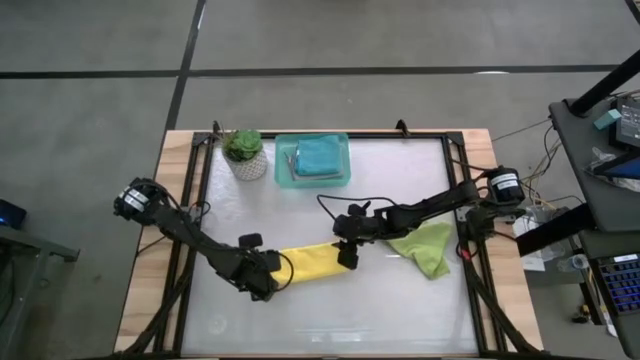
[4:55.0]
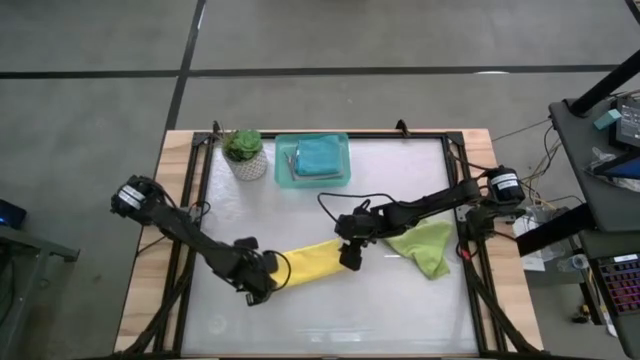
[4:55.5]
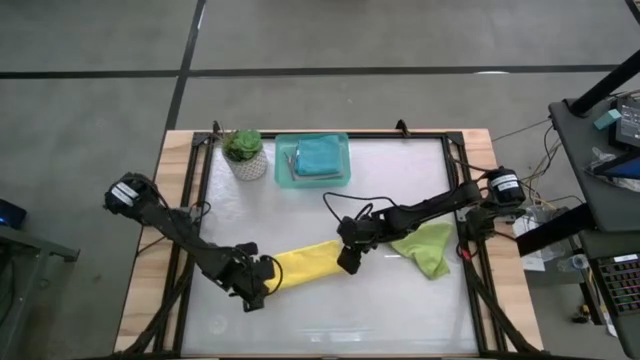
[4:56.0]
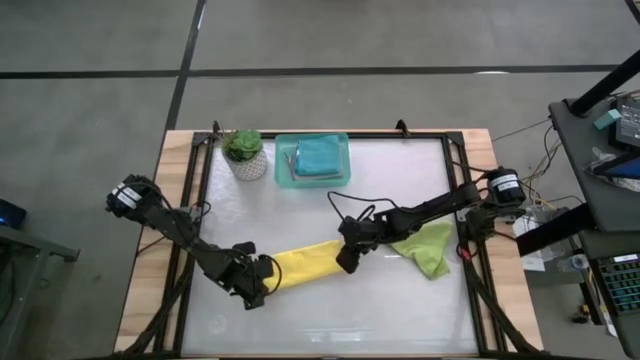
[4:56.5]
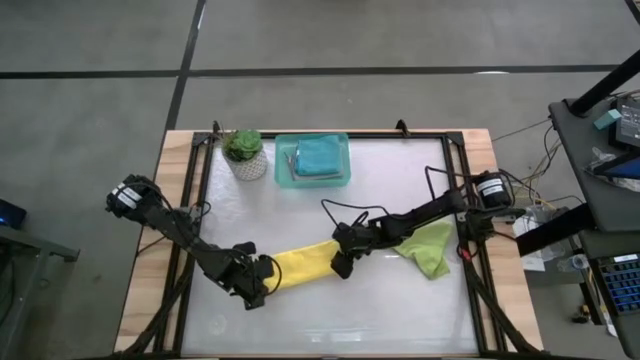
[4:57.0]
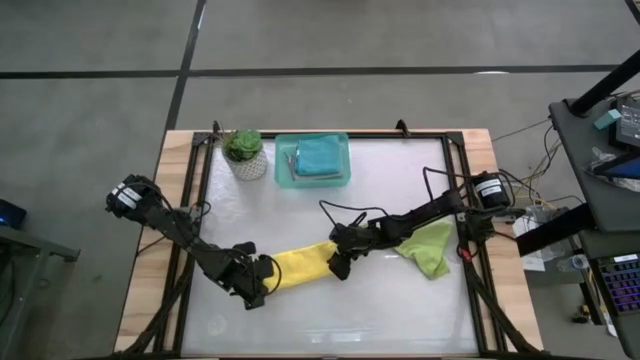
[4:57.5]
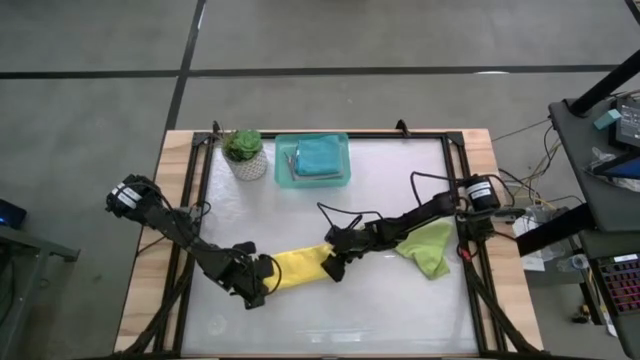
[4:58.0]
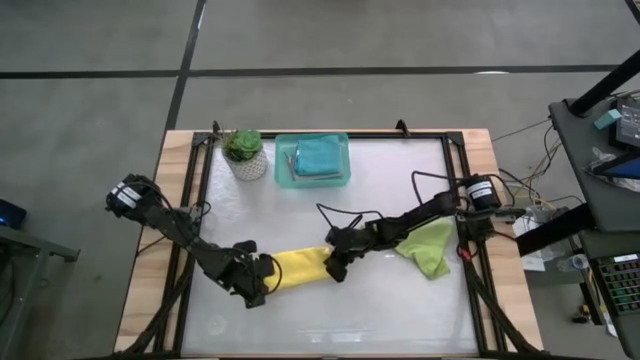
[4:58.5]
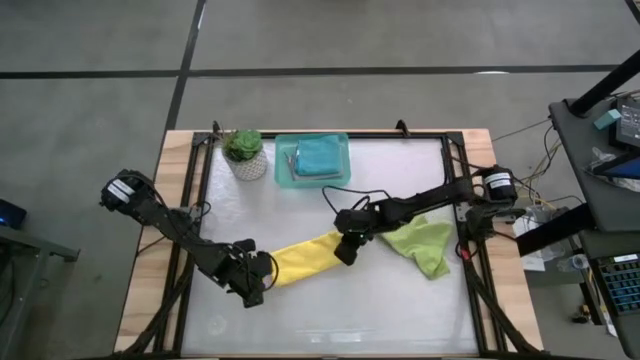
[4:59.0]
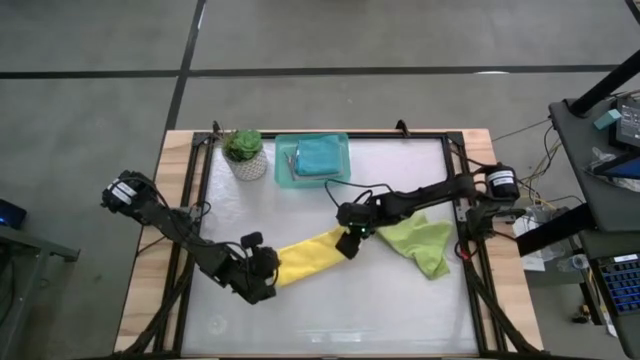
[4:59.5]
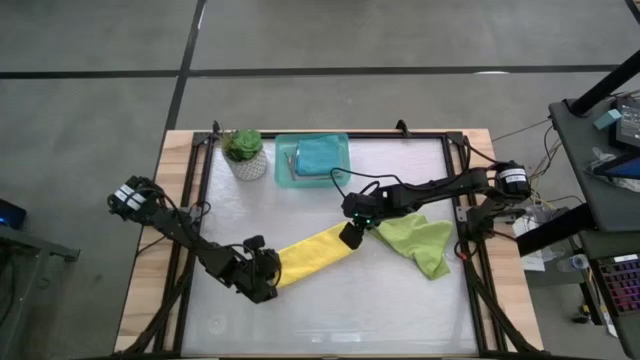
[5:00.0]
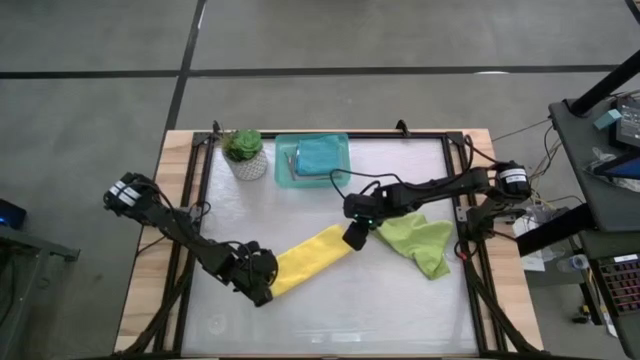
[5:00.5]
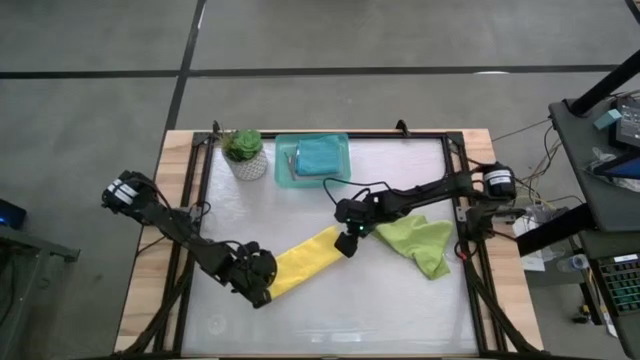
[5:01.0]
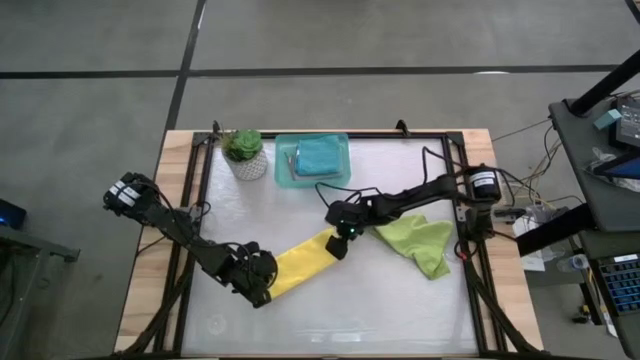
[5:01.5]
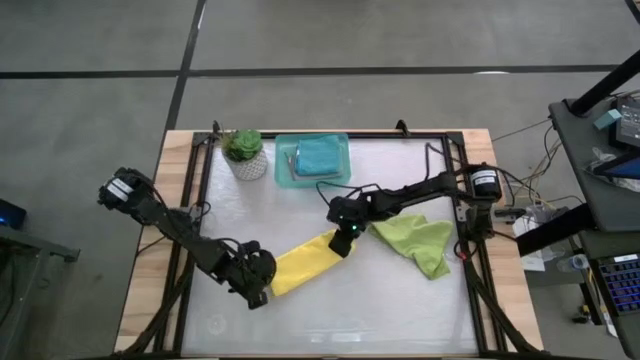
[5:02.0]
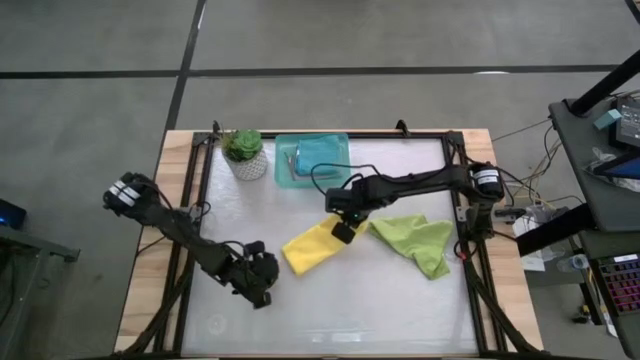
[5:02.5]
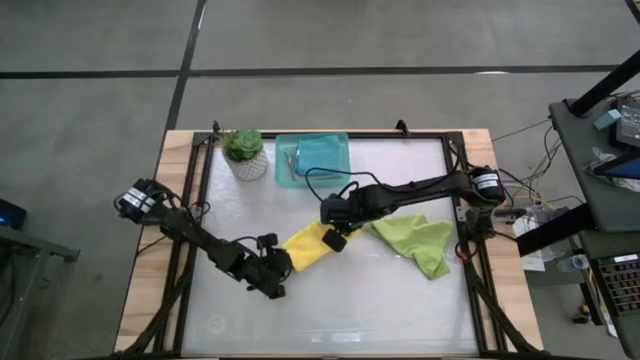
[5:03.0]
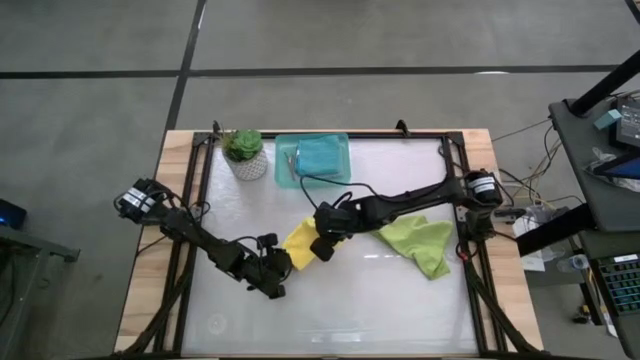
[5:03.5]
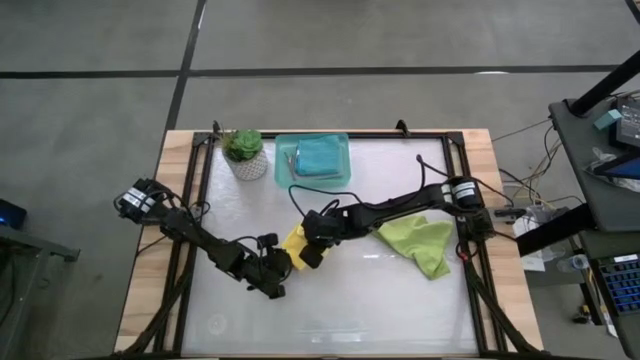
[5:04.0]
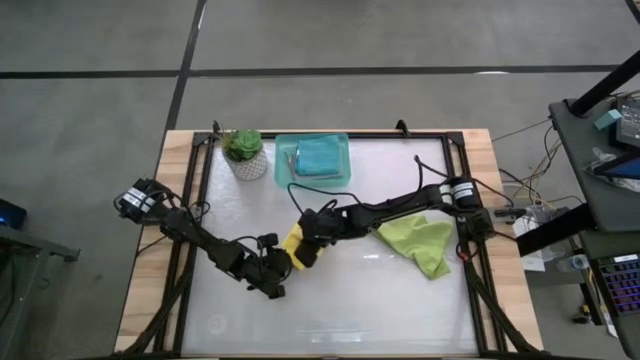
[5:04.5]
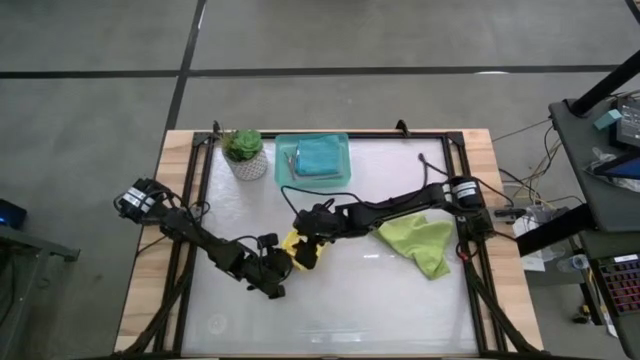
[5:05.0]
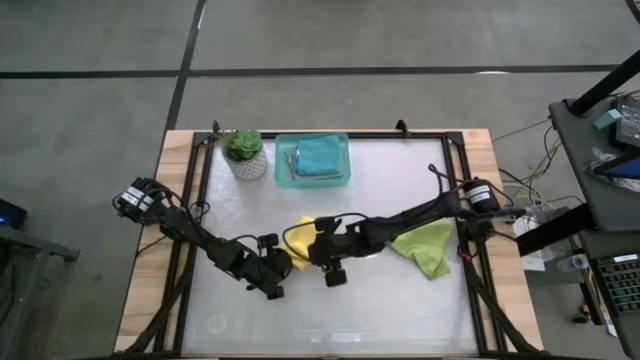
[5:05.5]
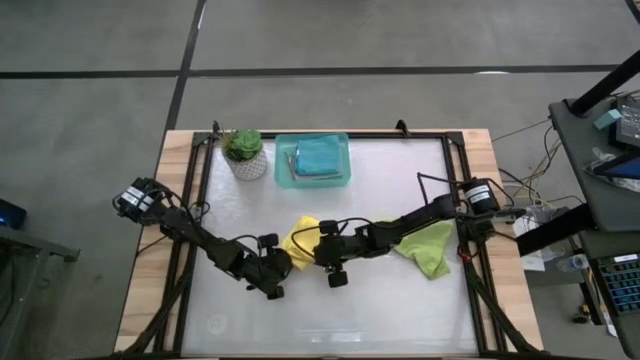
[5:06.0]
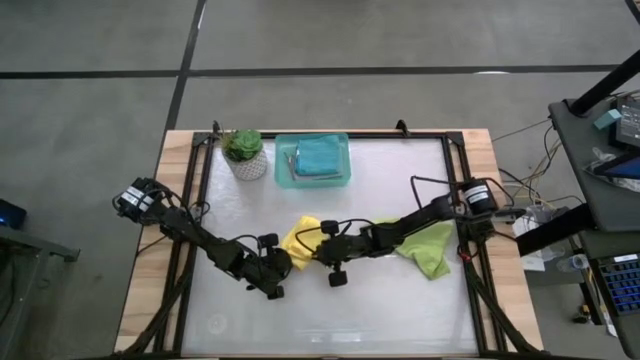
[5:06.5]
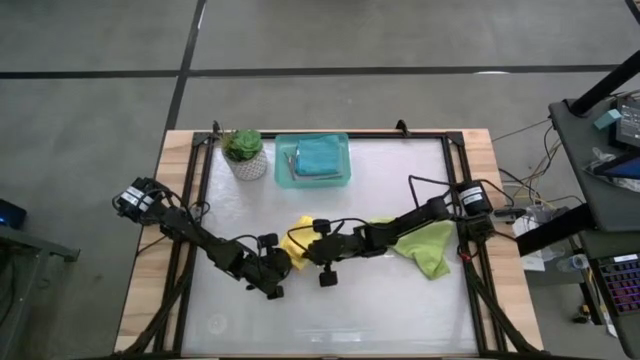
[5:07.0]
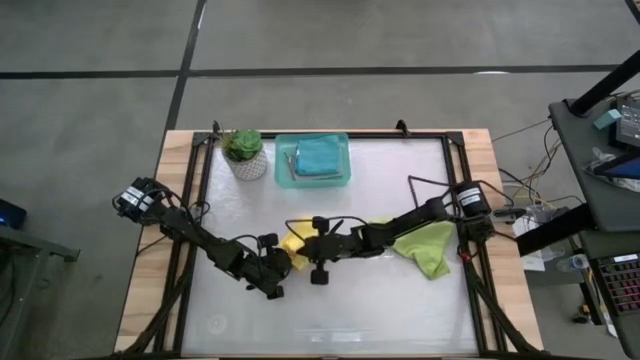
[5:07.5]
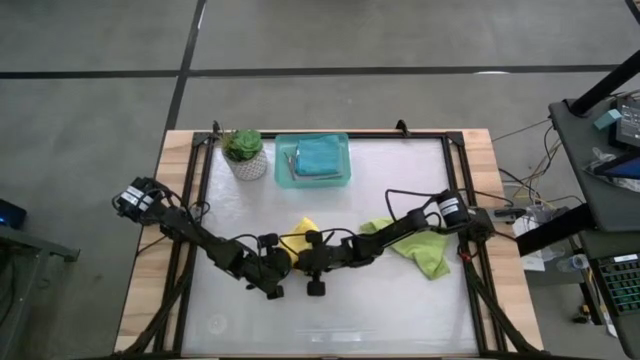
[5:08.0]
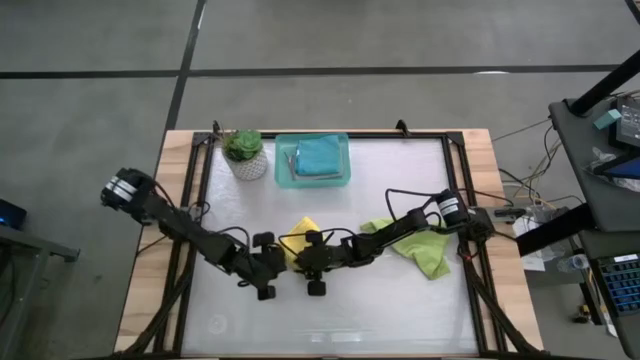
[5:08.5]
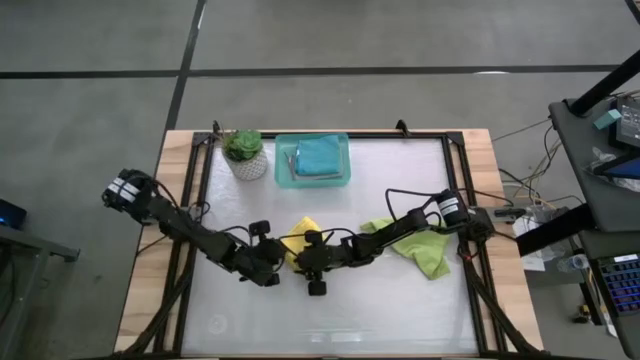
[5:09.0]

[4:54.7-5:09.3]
Task: Fold microfiber towels
Fold the yellow microfiber cloth

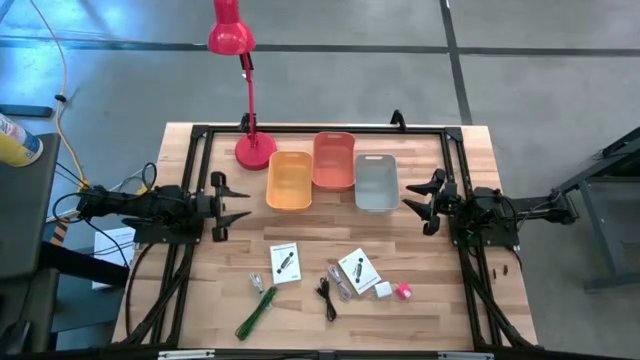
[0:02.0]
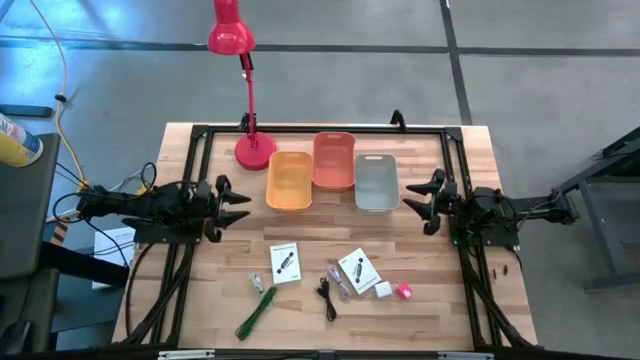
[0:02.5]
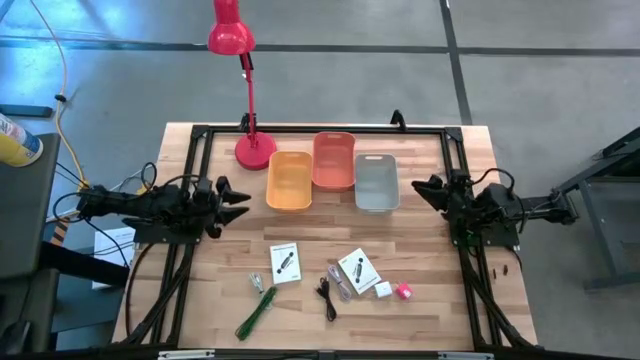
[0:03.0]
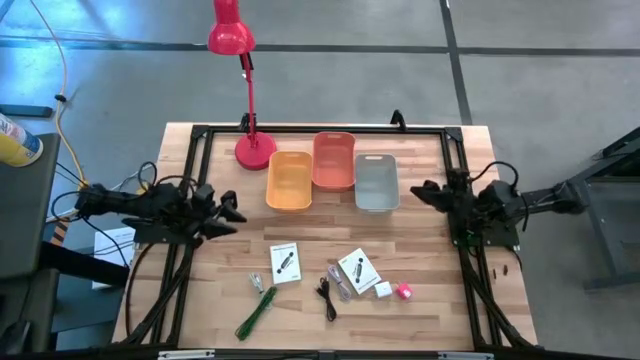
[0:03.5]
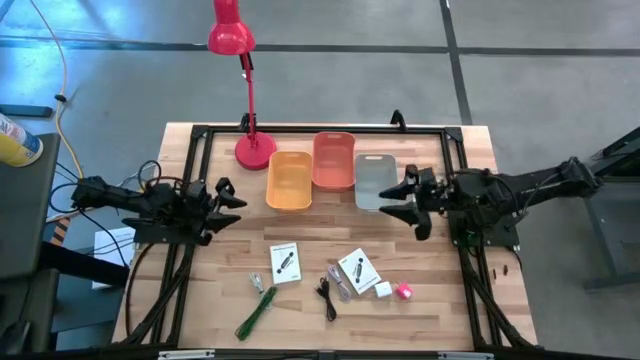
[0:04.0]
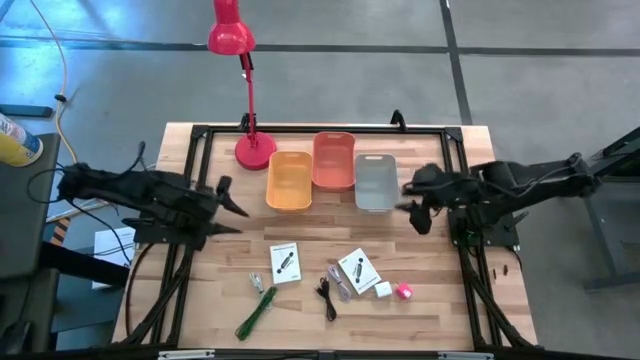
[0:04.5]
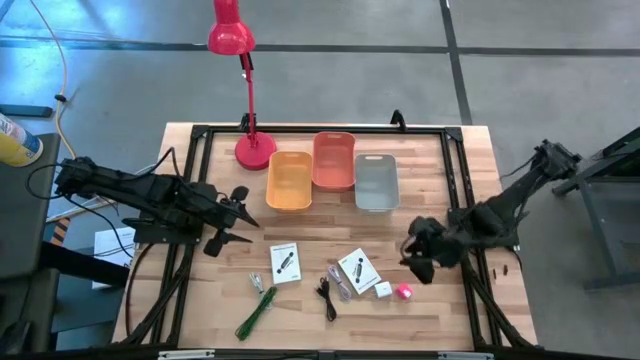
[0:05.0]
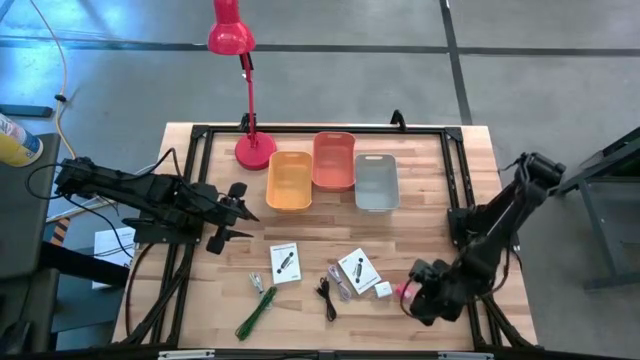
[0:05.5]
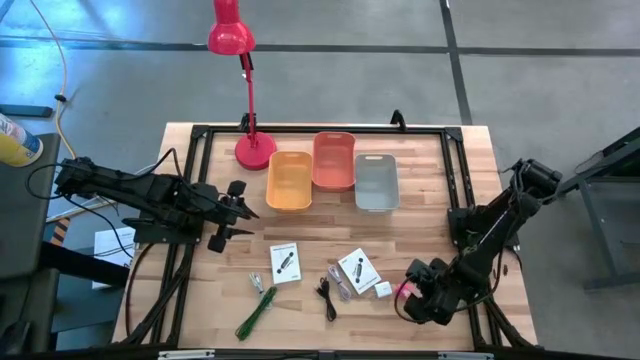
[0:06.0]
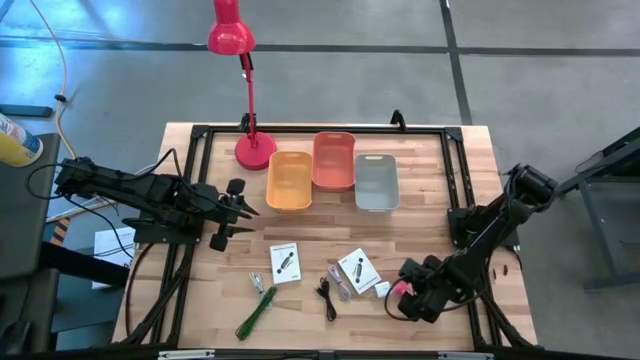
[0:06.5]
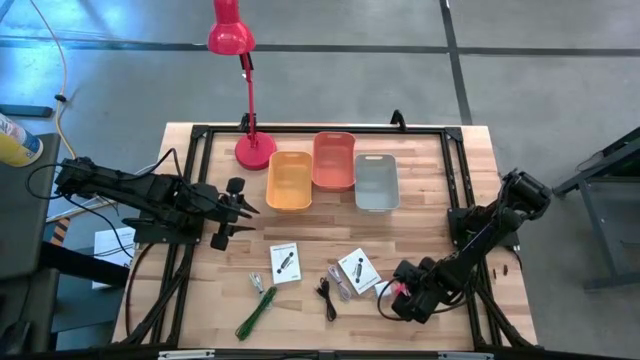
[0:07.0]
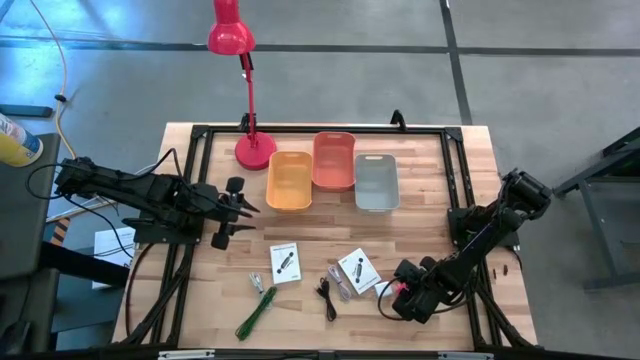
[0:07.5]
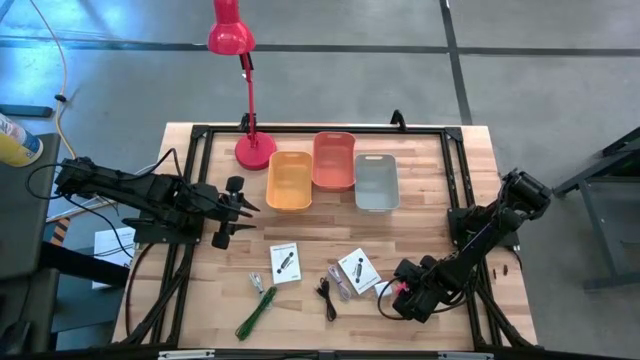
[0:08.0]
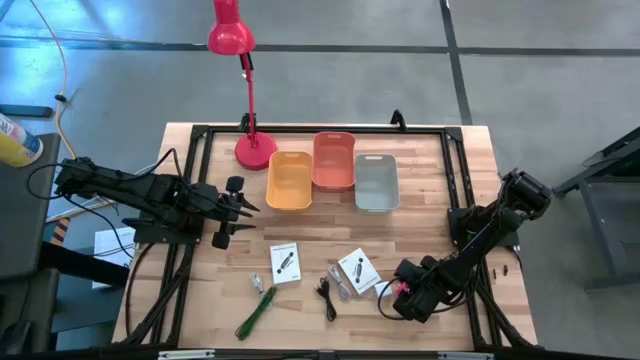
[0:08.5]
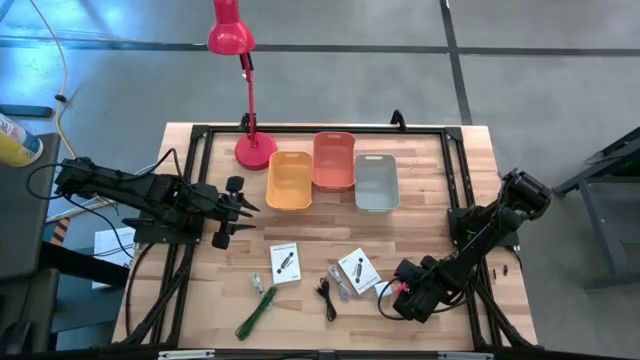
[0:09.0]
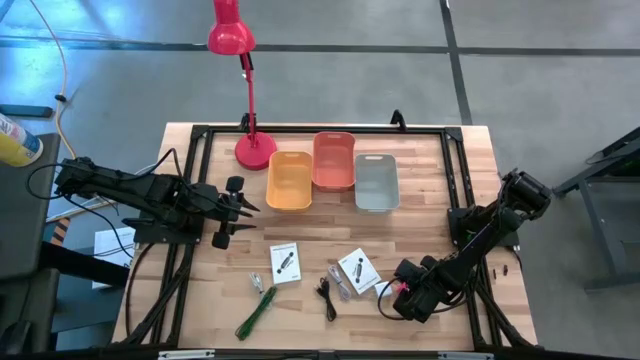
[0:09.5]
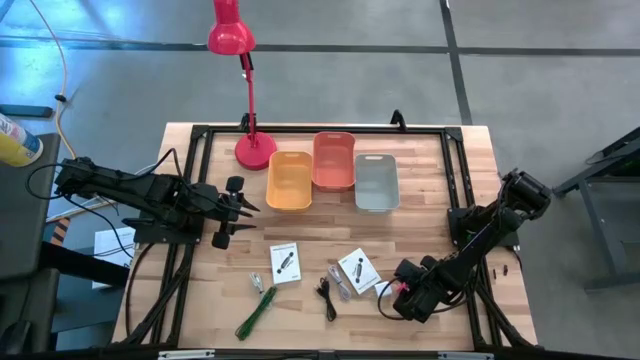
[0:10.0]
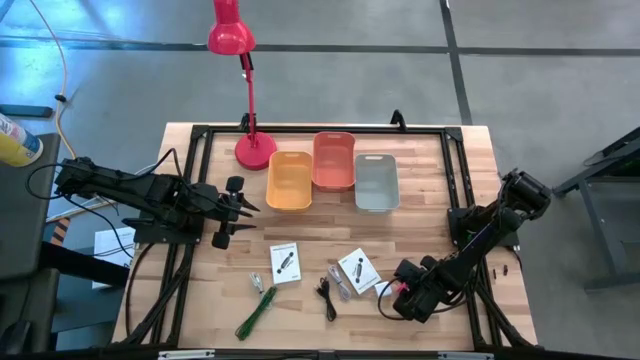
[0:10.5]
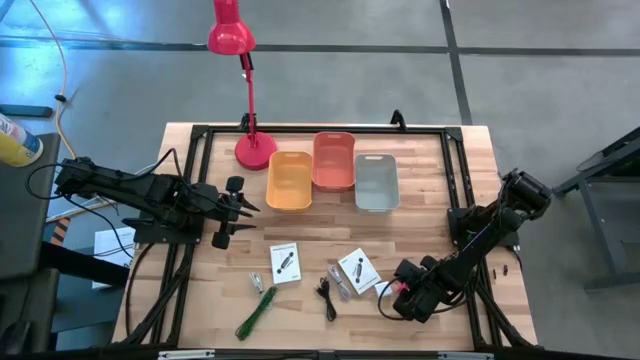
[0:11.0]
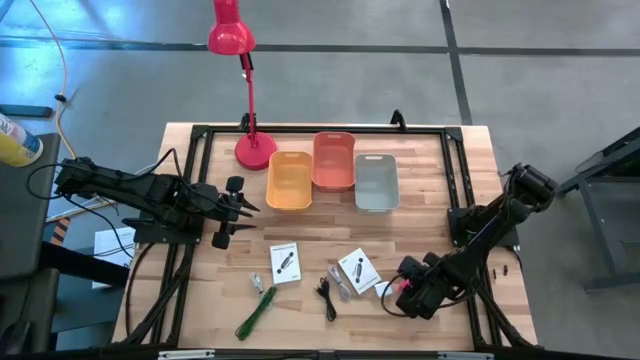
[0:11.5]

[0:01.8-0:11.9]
Task: Pick and place items into bin
Put the pink charger adaptor into the gray bin
